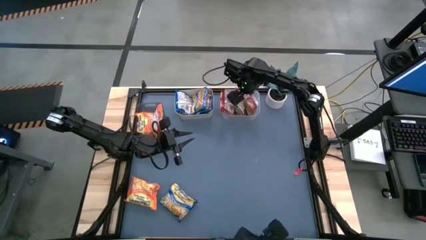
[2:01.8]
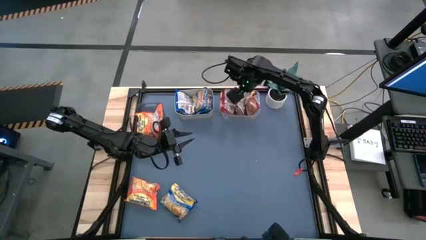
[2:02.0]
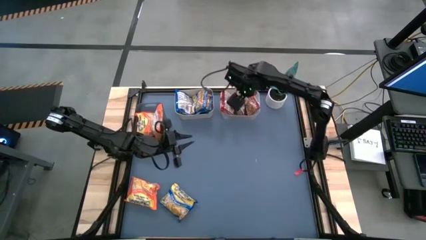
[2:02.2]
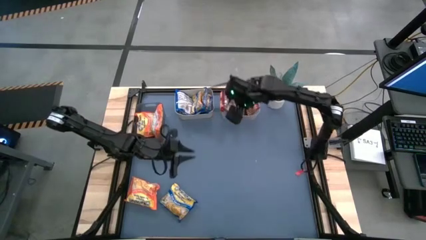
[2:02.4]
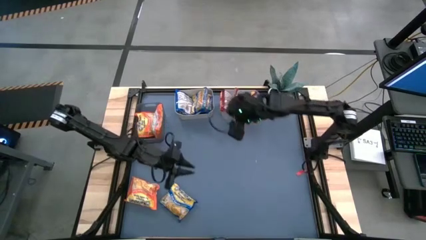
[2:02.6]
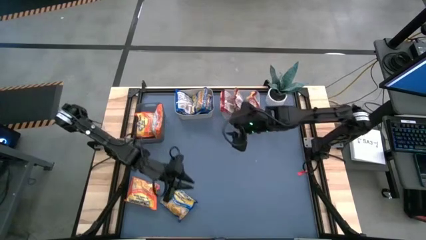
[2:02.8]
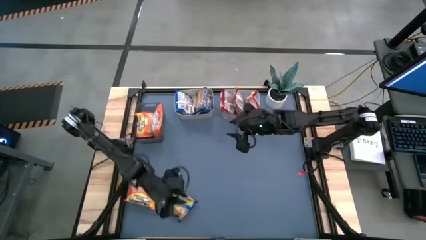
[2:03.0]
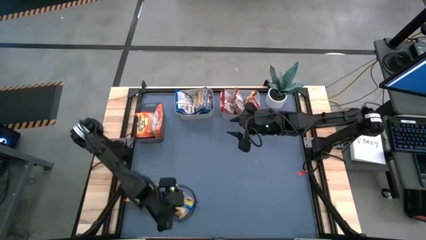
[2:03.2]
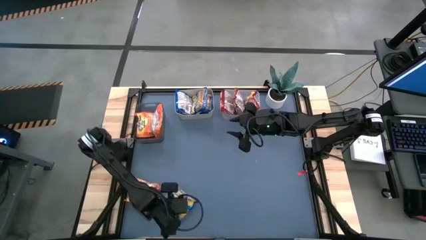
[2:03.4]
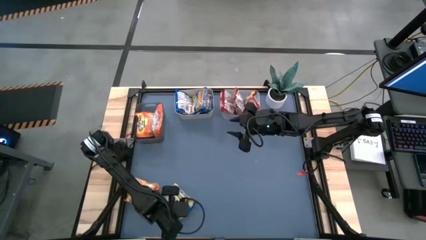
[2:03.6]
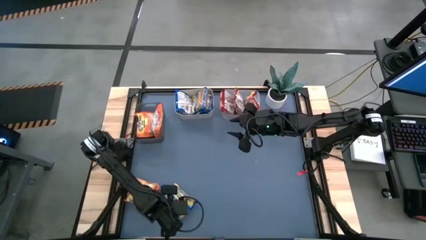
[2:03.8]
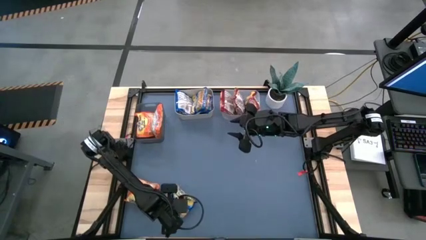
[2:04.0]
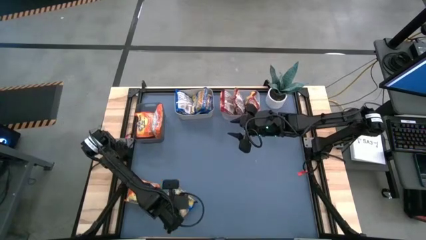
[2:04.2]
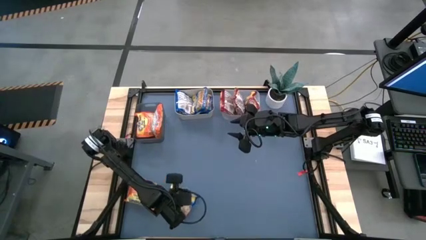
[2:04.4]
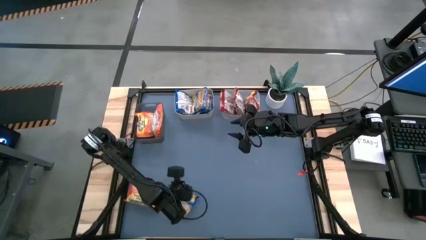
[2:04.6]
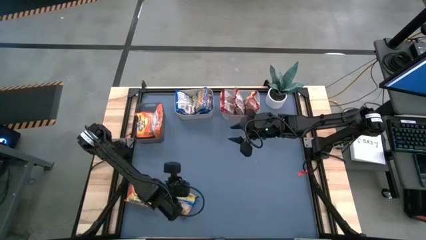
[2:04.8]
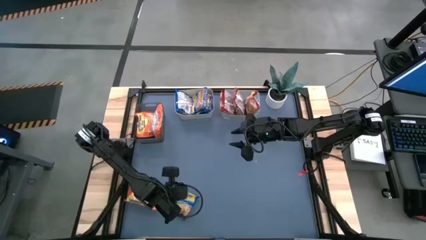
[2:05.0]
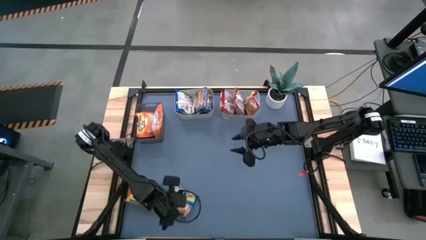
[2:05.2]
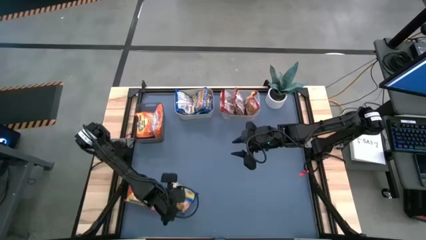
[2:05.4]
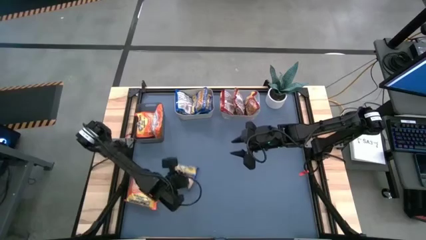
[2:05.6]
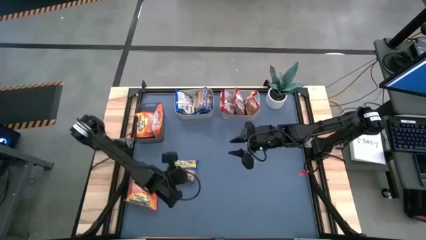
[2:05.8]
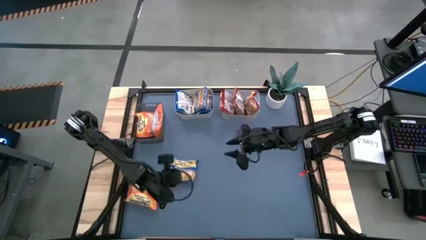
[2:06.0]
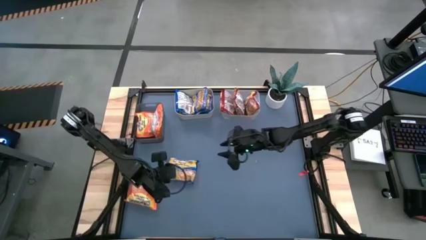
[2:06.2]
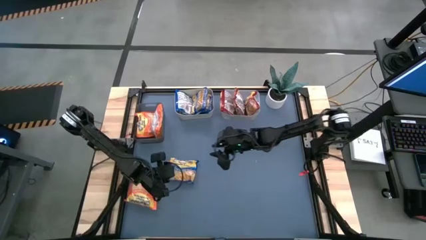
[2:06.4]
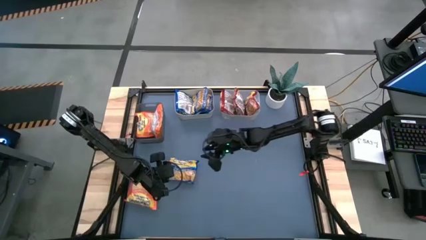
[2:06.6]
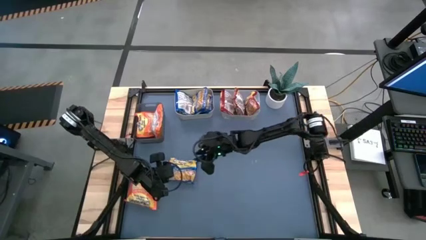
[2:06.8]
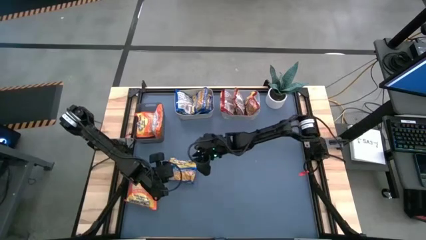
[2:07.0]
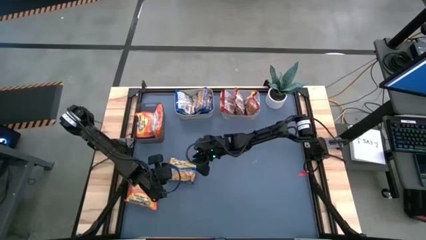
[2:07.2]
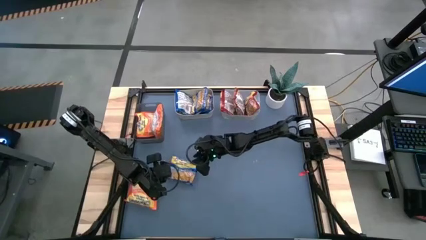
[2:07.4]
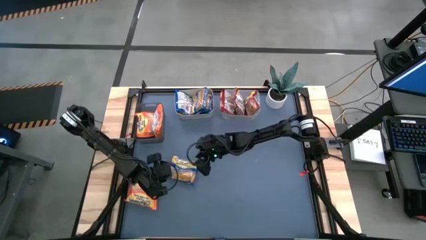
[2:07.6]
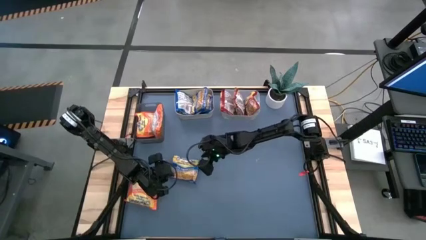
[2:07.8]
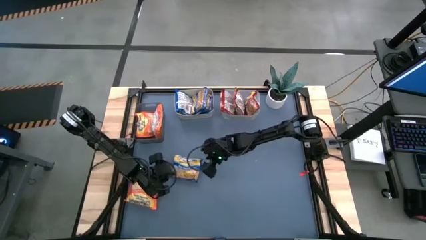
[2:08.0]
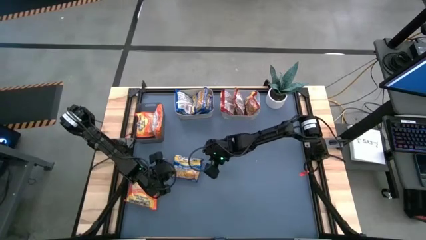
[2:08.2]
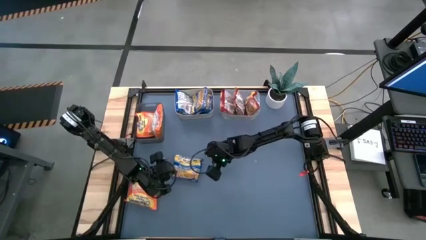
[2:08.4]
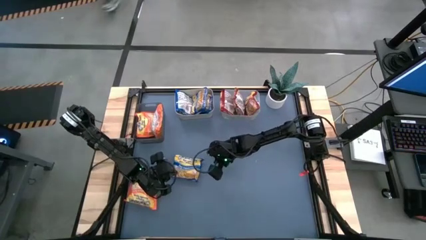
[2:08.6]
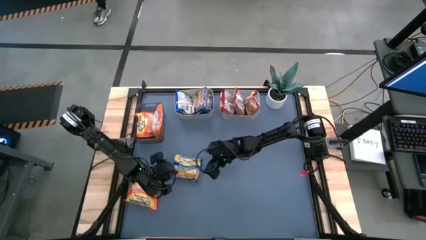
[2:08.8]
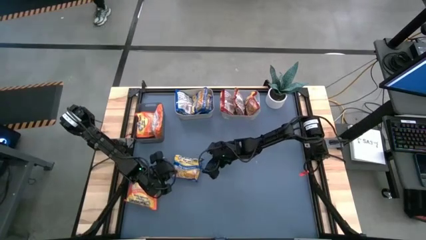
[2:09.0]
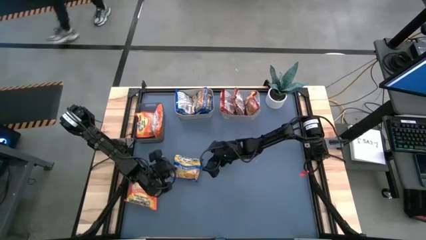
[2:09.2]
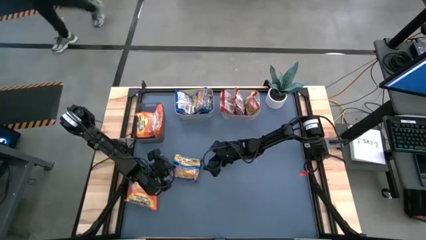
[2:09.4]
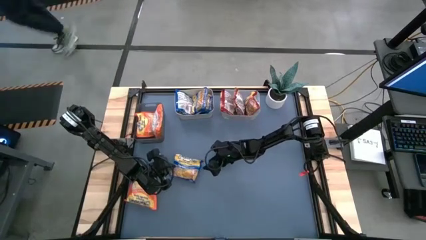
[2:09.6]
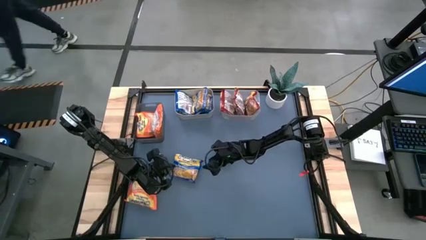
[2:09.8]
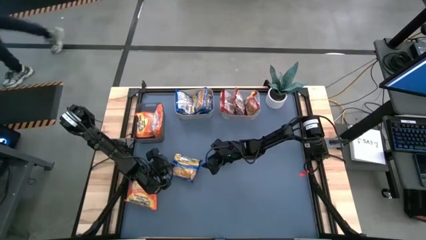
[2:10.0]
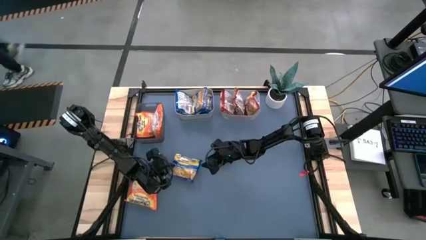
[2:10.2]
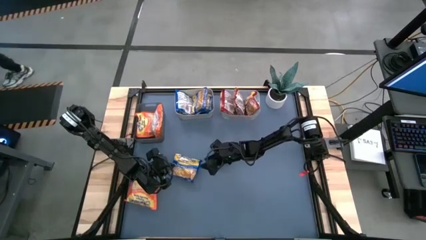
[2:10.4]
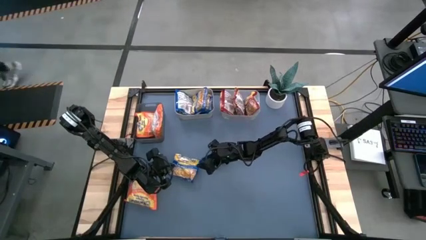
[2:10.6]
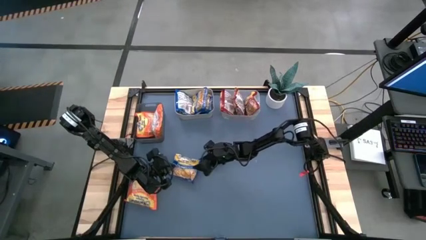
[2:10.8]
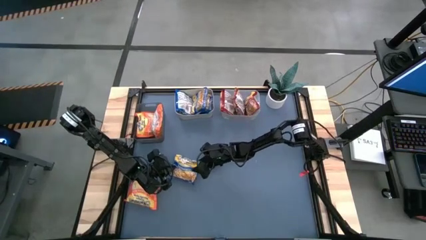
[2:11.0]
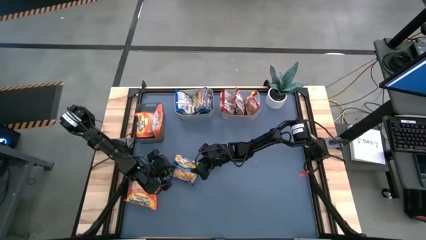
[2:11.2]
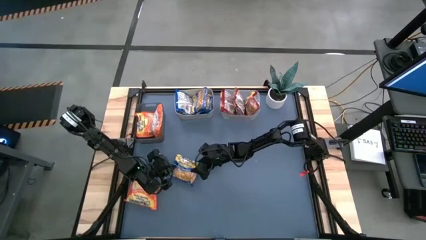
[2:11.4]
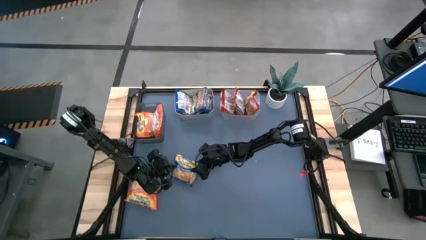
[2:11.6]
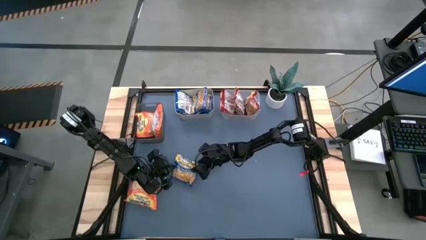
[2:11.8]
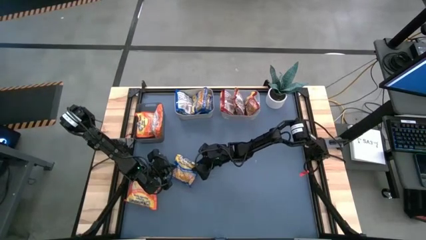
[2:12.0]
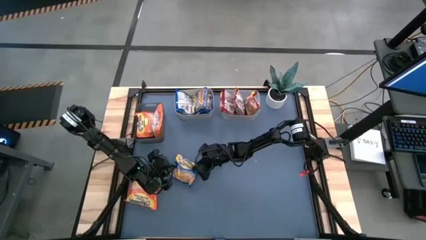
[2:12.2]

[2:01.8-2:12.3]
Task: Sort Maruchan noodles
Put the blue noodle pack into the gray bin

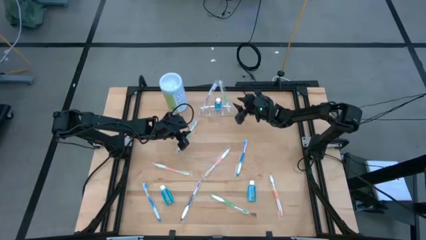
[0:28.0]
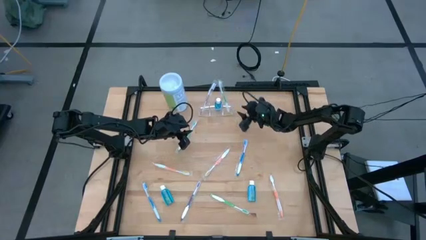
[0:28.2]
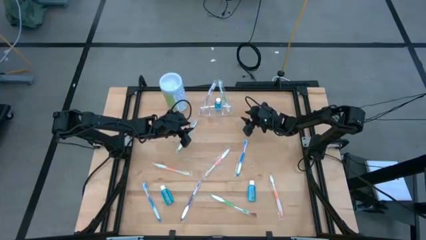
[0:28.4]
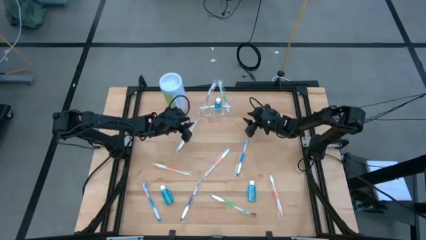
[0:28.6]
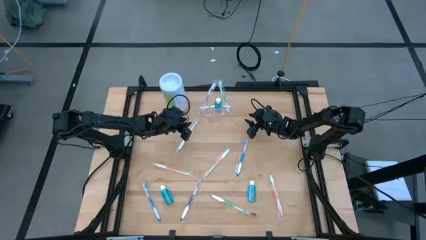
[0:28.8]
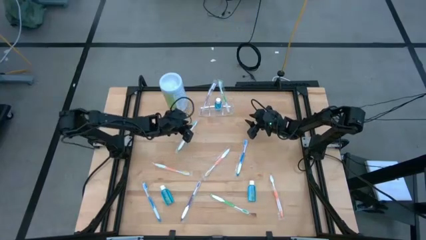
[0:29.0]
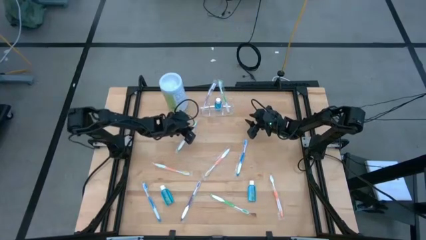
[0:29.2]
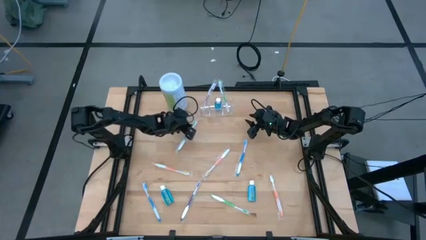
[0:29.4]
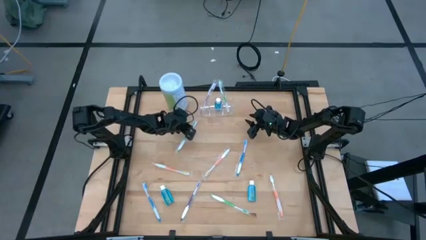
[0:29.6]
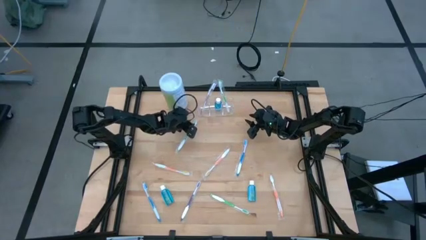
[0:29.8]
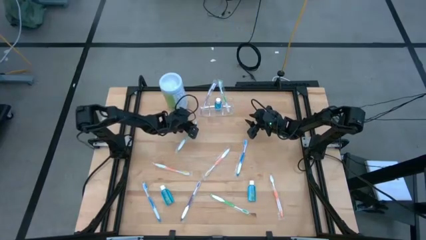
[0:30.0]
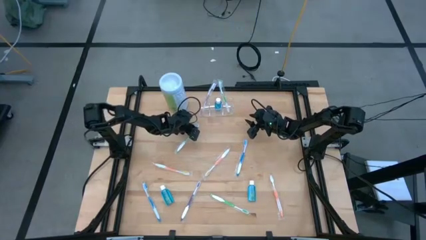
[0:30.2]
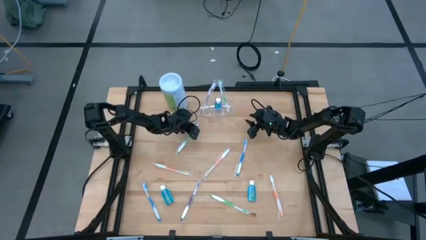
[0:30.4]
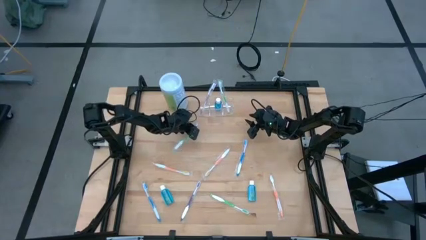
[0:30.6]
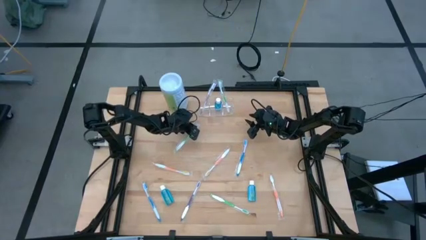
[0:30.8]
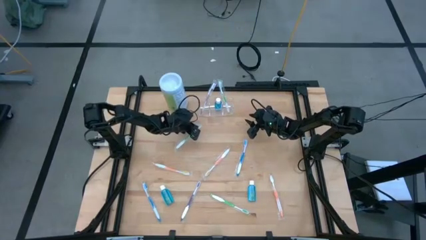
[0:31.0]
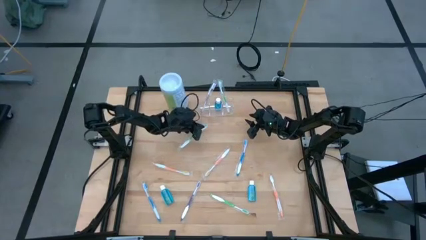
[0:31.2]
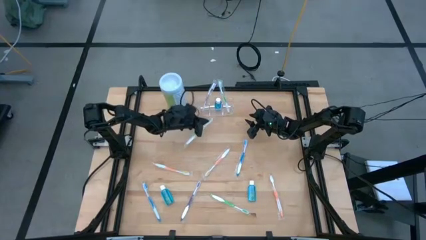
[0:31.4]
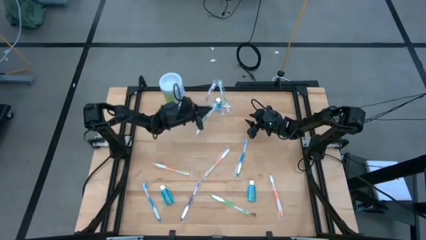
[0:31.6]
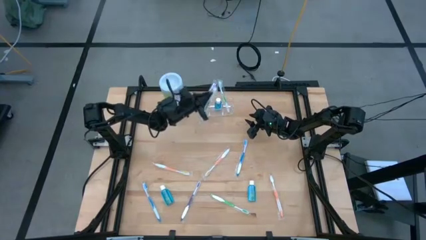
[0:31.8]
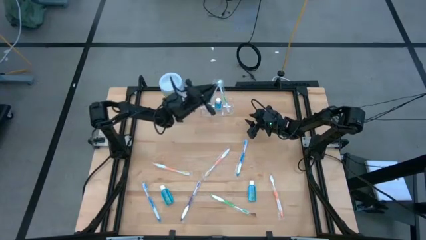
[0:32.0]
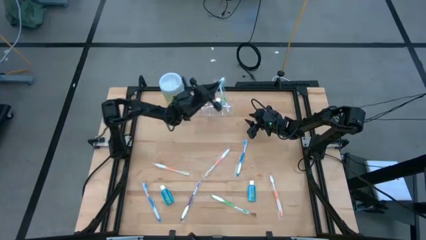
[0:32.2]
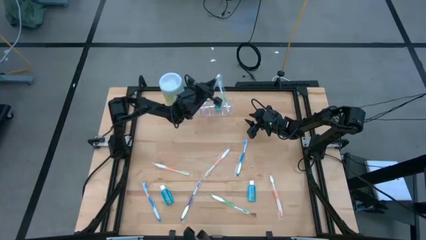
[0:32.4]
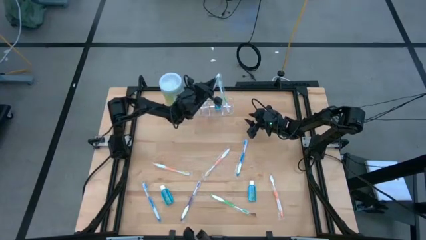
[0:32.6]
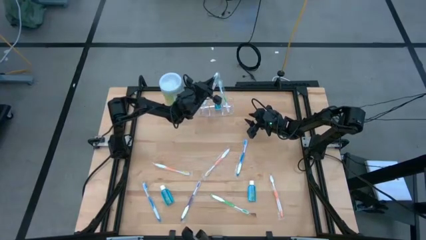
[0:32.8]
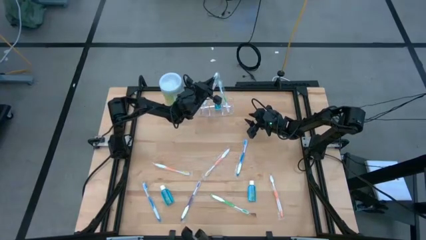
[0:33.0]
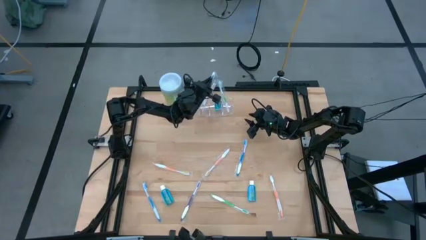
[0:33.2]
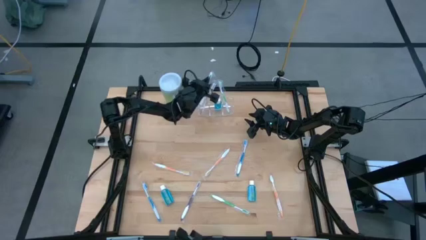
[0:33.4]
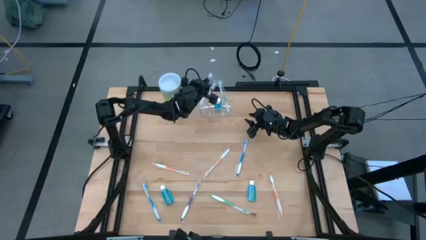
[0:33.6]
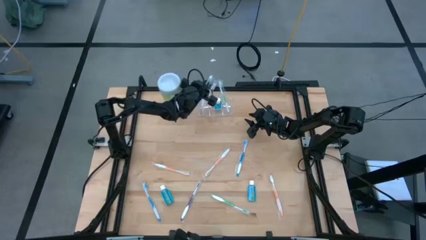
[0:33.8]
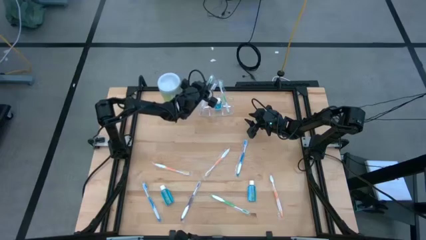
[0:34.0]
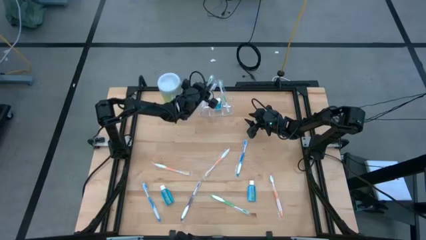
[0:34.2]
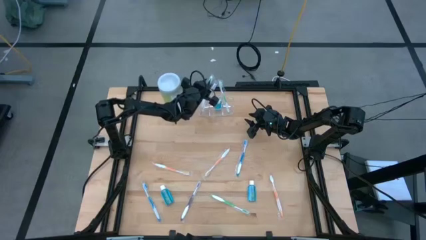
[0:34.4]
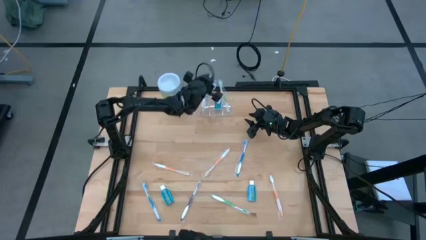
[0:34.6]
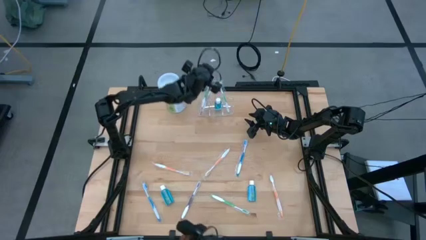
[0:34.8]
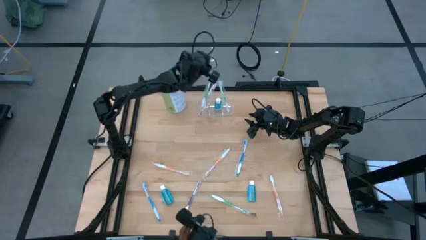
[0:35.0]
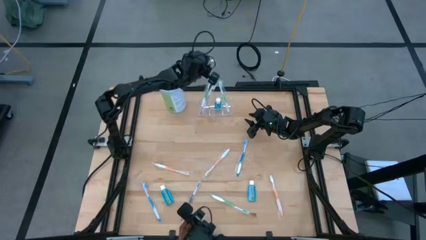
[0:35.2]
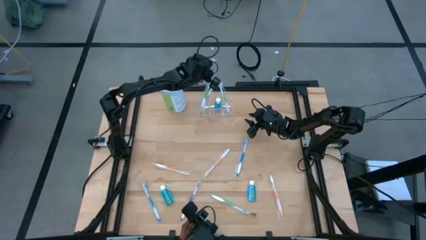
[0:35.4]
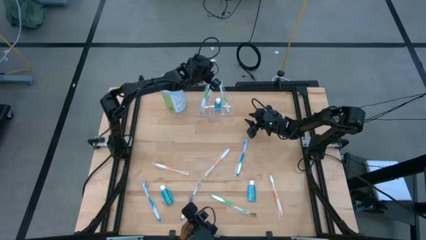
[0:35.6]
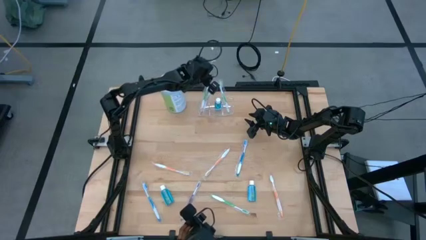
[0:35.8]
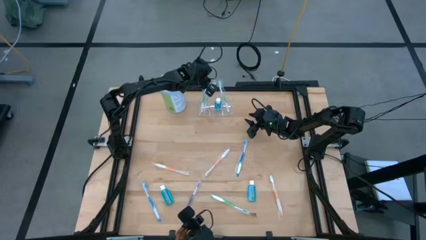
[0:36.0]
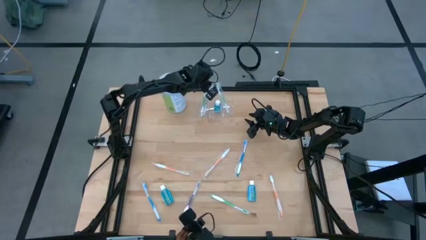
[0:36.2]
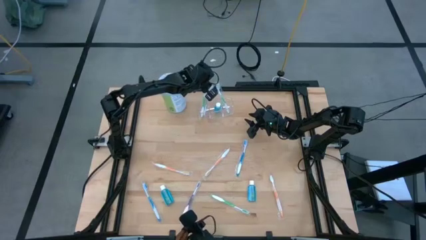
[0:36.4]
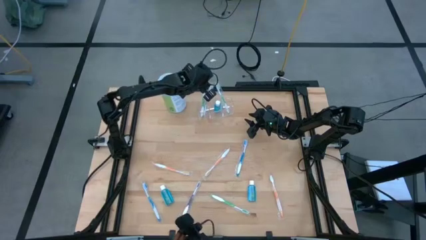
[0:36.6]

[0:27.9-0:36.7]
Task: Pick & Place toothbrushing station
Put the top green toothbrush into the transparent organizer
